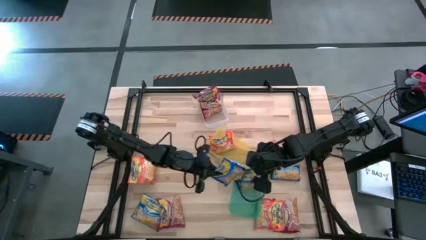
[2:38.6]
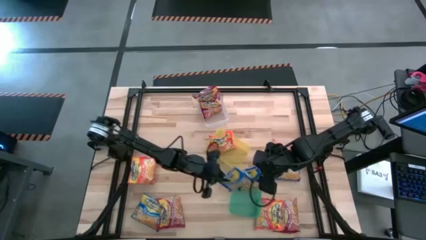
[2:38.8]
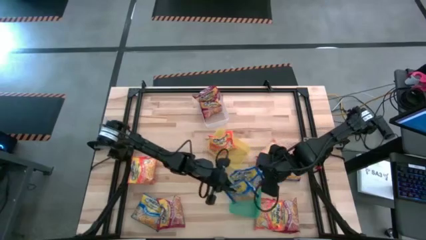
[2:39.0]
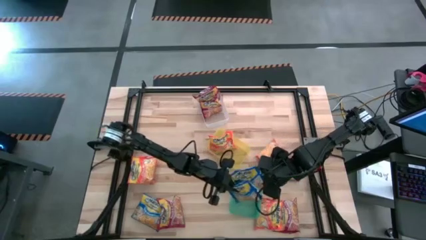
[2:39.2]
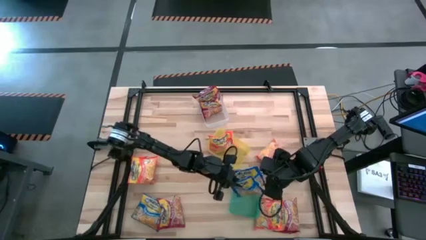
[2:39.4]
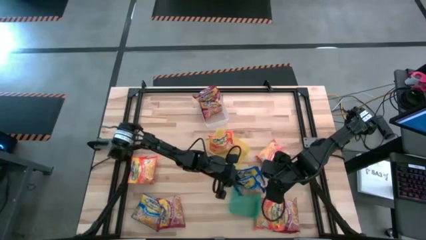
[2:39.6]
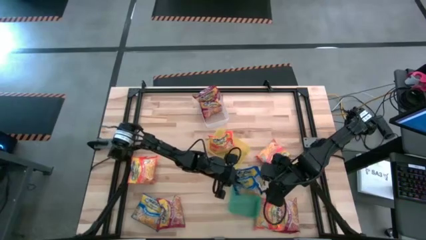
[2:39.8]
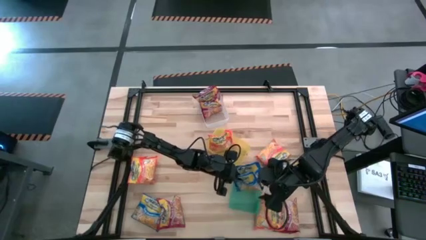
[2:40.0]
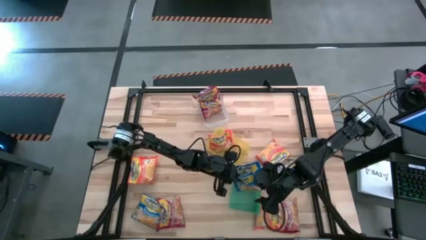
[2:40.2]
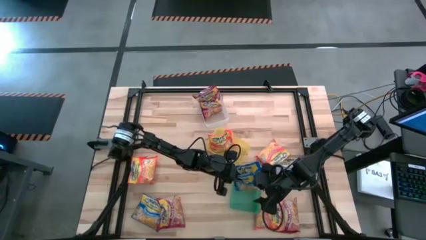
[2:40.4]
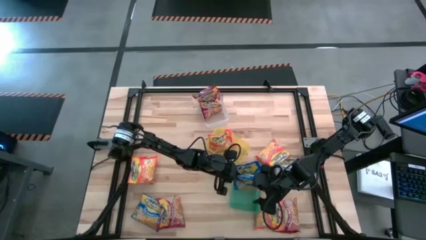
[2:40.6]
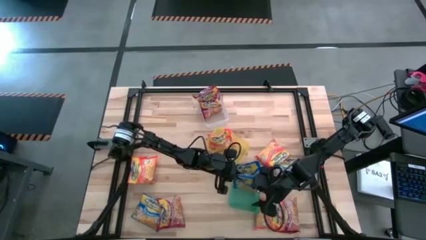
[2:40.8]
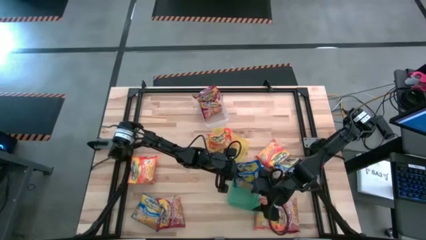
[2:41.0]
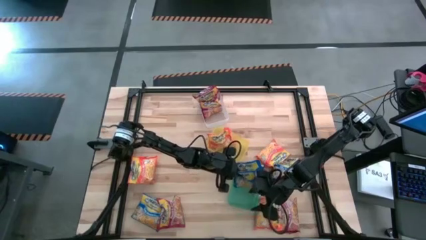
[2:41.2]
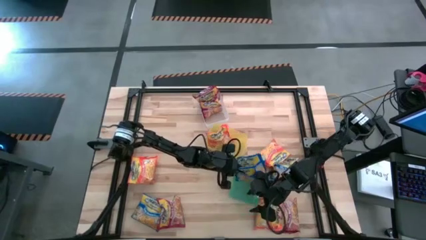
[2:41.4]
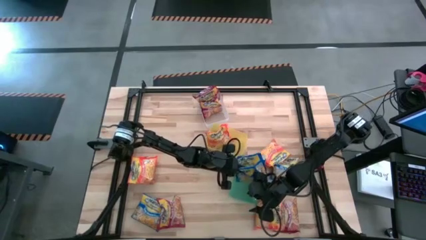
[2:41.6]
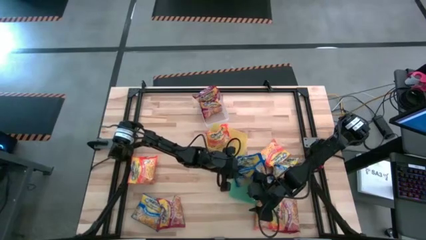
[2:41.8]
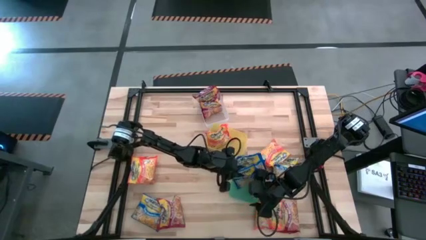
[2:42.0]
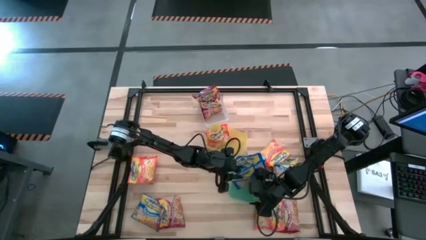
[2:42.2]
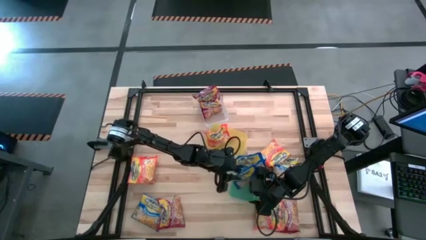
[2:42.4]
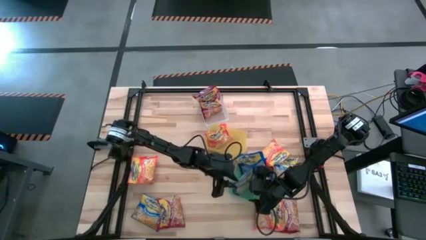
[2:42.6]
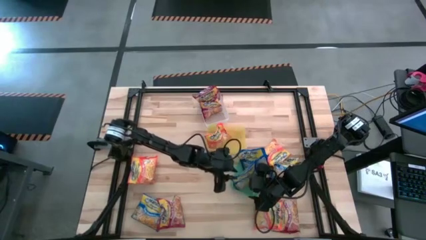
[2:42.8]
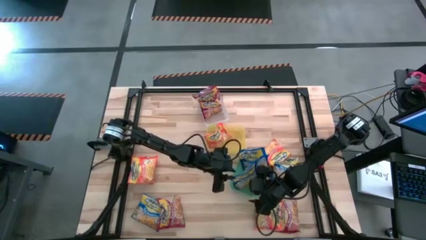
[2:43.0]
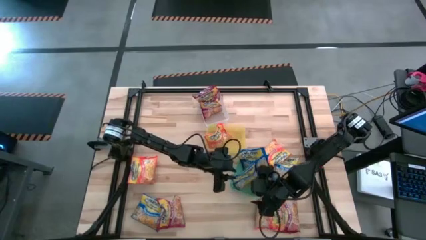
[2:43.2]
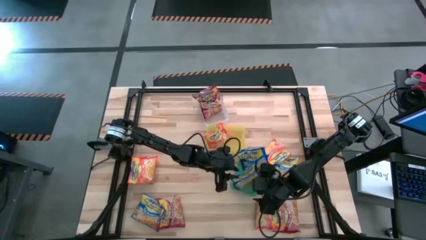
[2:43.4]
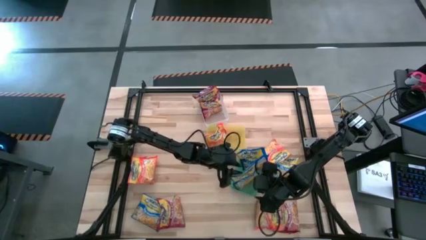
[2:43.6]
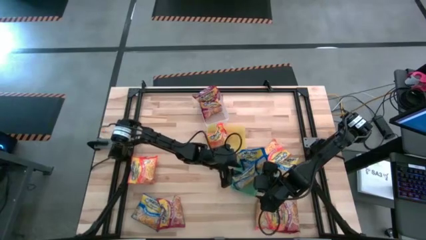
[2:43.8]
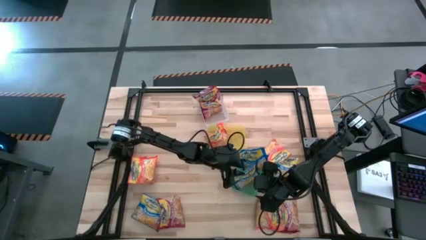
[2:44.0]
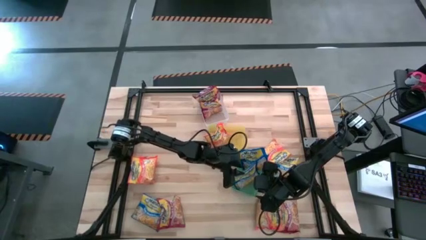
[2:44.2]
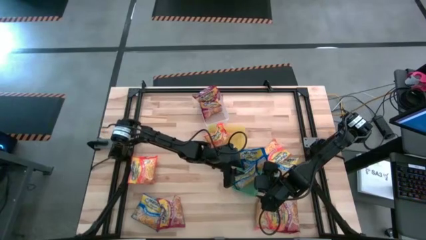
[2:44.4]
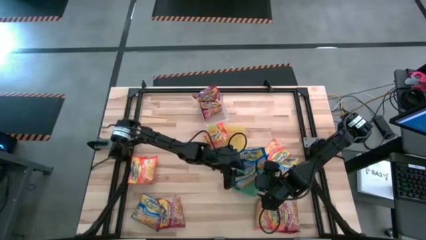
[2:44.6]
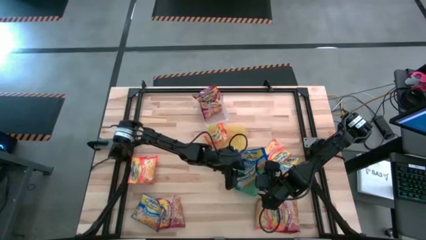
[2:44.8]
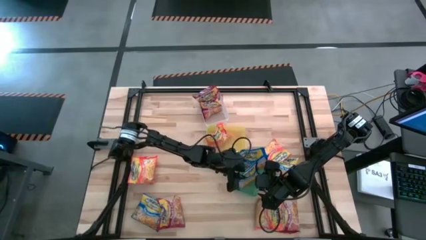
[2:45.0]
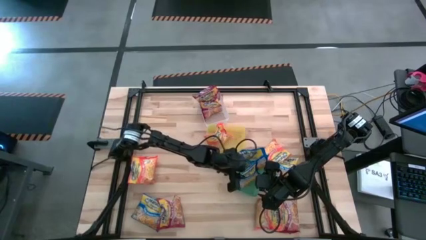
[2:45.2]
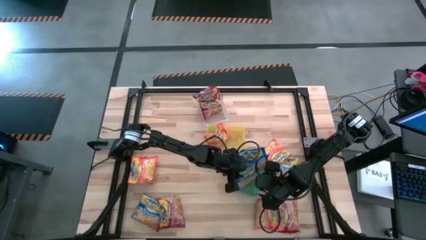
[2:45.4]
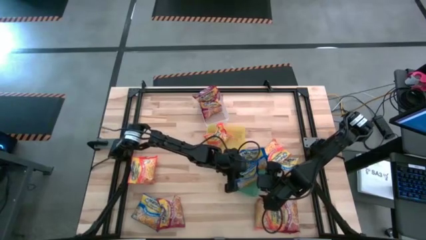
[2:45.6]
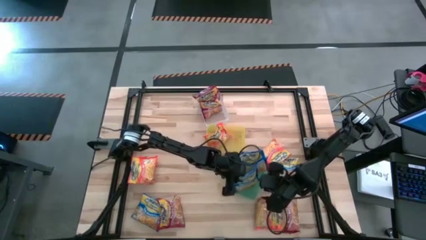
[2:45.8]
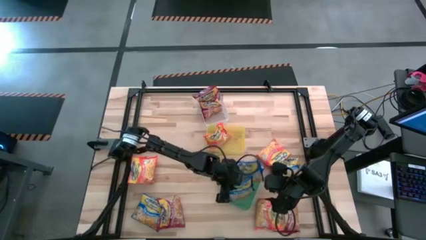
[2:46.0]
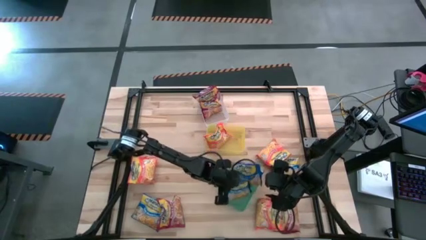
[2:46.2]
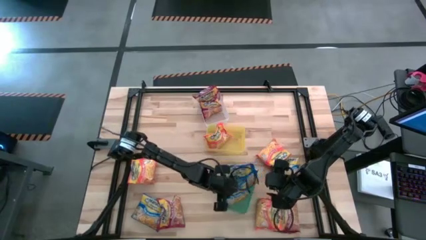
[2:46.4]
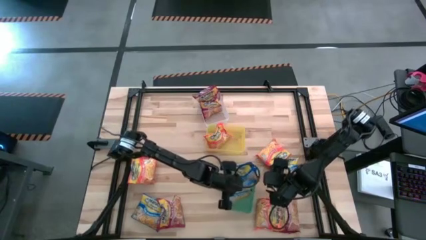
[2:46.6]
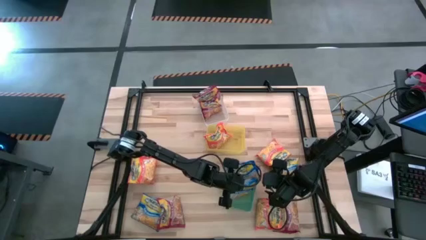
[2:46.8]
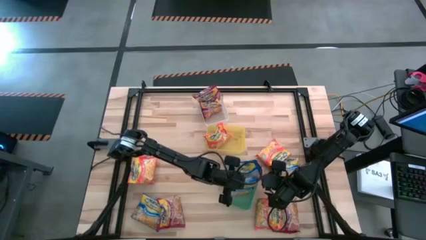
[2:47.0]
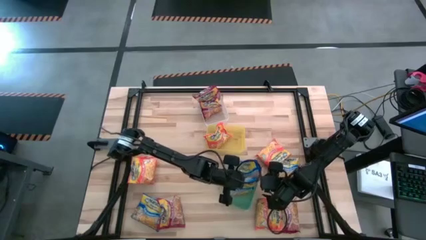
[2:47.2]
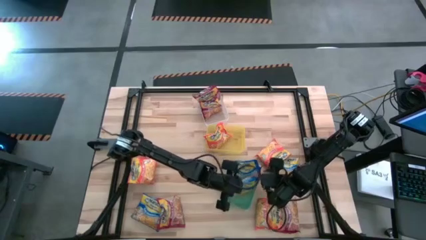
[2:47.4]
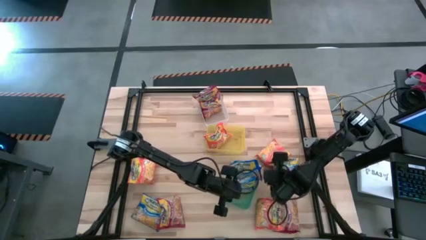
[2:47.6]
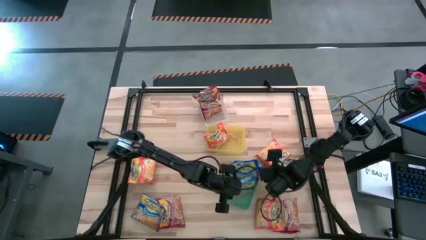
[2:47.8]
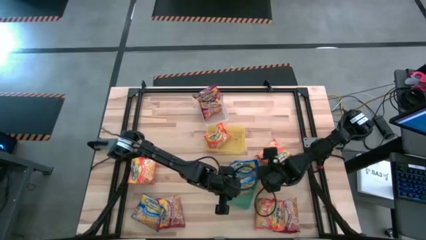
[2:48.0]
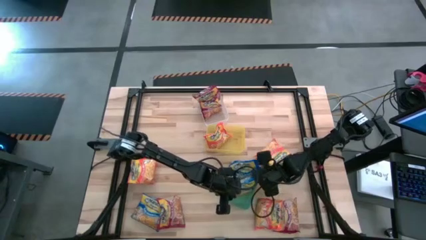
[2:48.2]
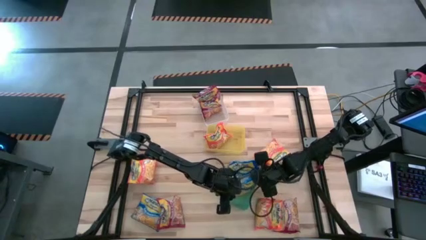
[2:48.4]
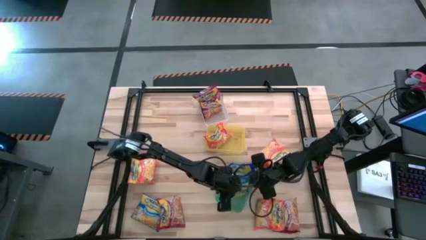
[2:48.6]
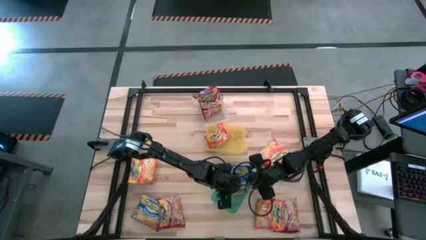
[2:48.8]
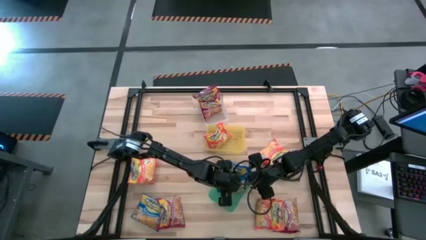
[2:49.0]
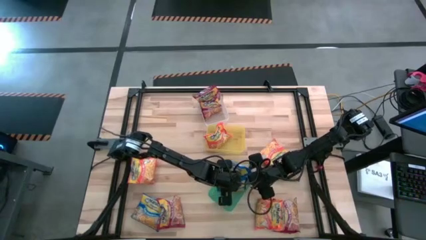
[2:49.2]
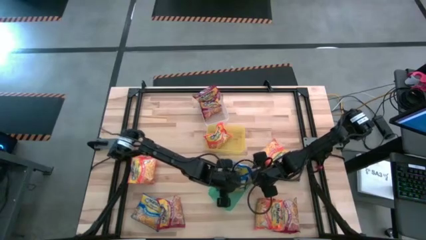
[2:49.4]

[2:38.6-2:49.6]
Task: Sort Maruchan noodles
Put the blue noodle pack into the green bin

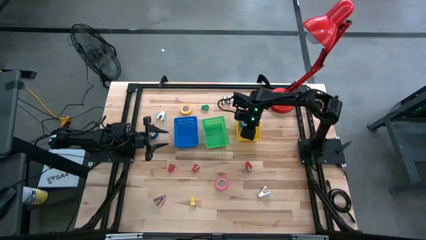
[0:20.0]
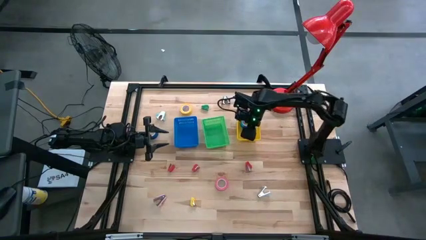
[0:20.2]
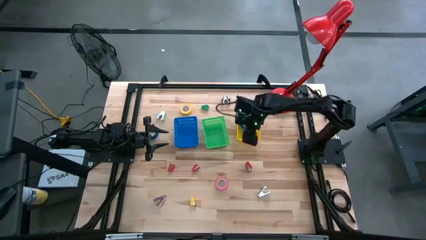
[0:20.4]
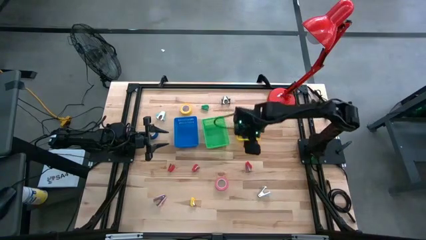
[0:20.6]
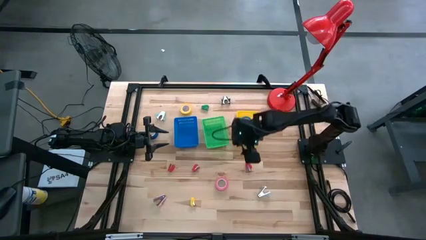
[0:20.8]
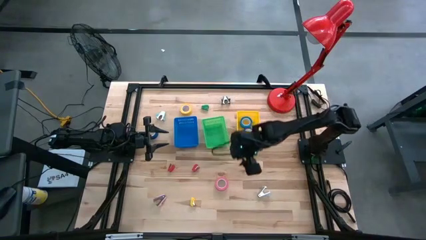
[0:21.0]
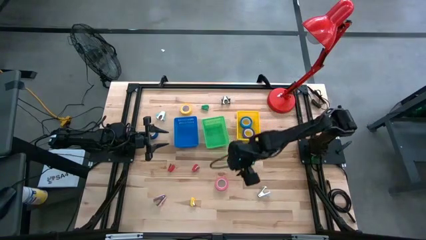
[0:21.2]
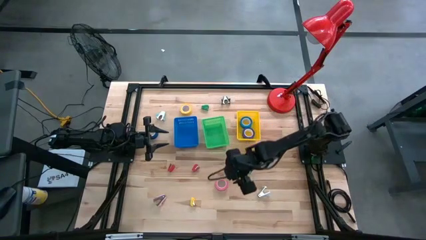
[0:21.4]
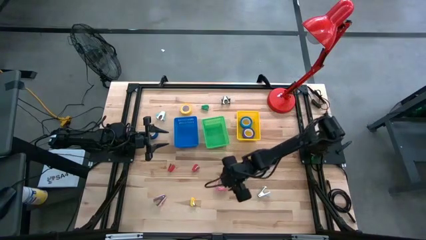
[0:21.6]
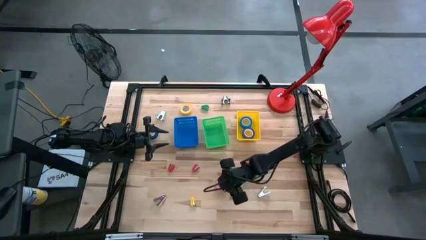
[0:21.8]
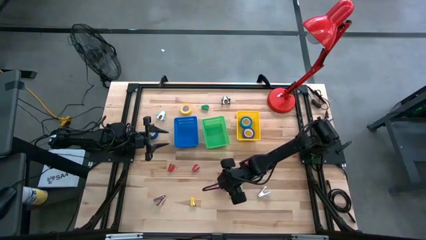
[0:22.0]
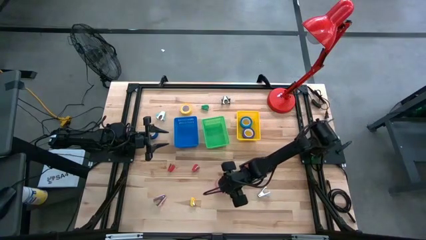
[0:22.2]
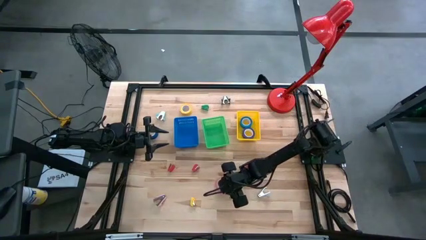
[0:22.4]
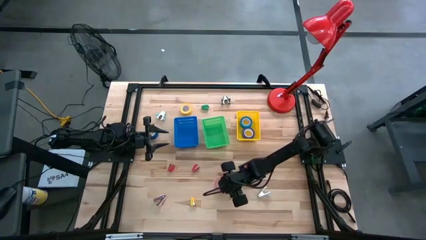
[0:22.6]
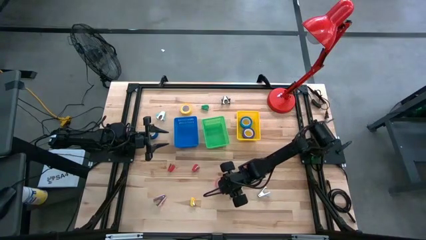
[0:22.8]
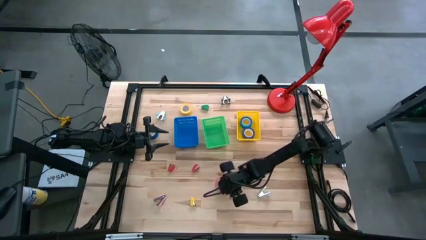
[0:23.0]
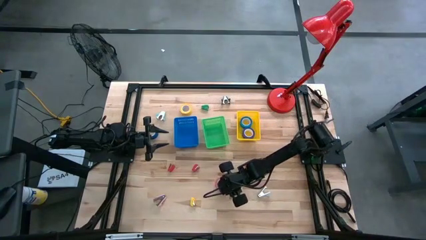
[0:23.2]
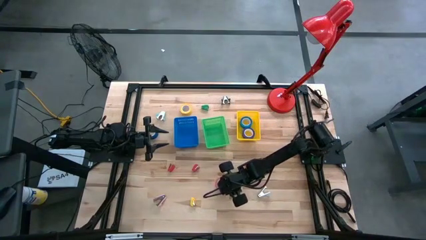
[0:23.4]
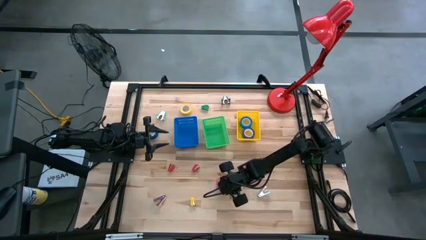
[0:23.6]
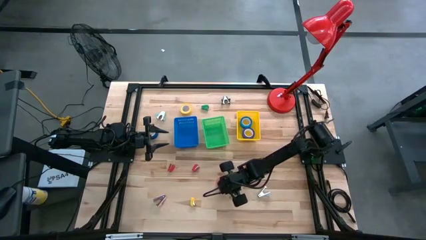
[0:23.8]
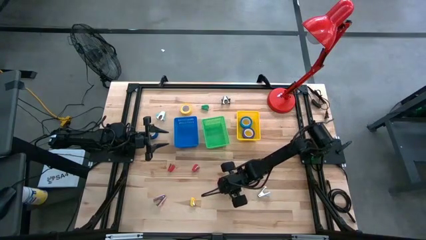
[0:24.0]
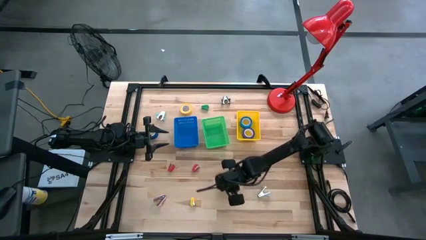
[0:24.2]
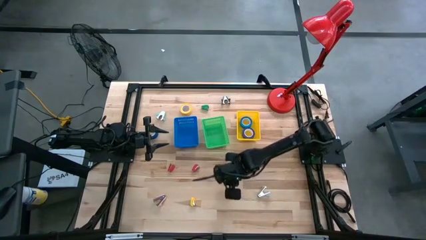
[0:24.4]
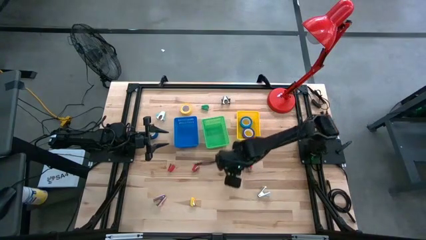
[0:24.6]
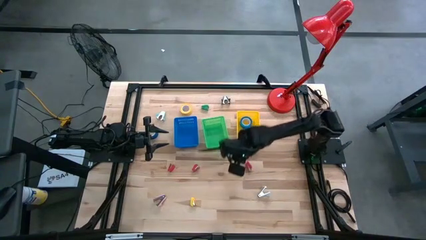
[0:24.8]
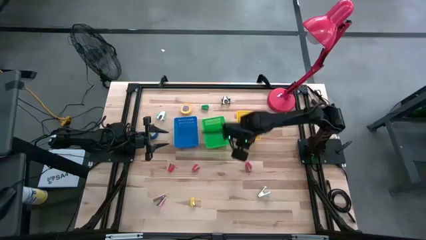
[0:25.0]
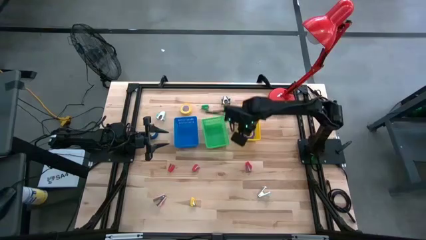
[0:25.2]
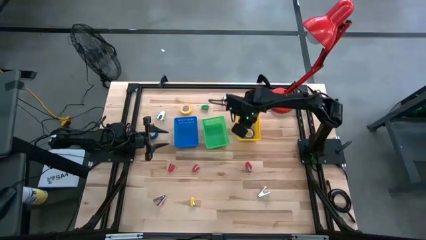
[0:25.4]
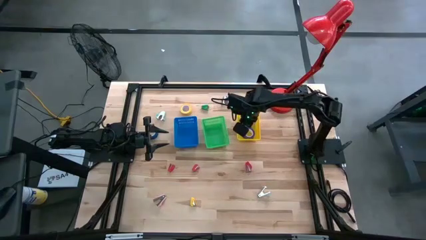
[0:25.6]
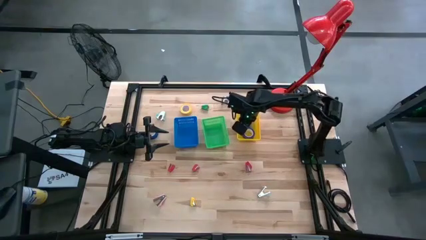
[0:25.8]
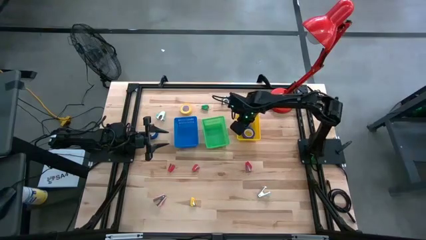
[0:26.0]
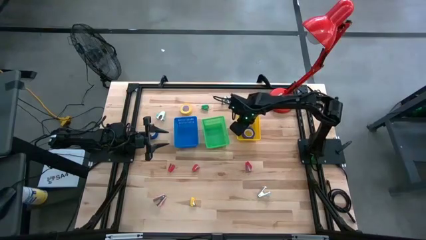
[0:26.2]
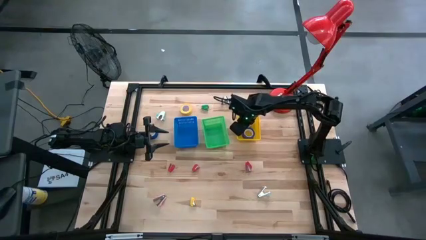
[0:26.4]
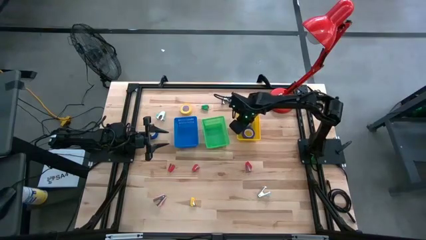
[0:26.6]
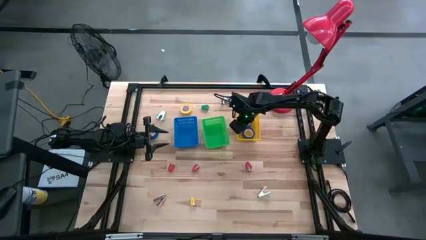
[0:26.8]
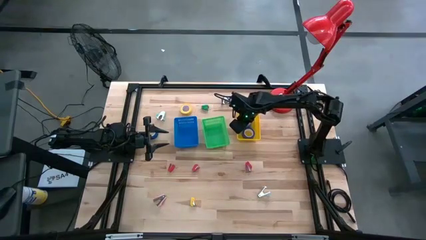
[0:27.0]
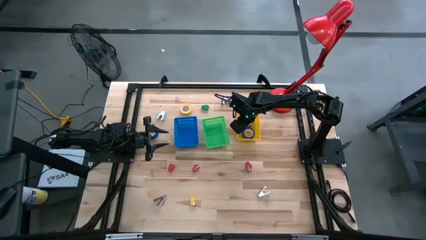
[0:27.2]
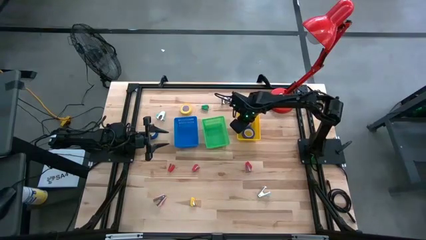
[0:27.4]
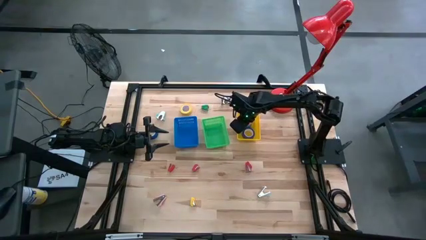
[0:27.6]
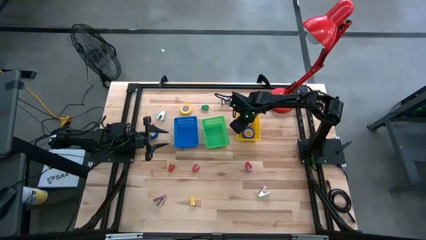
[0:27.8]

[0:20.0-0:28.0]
Task: Pick and place Stapler, Stapler remover, tape
Put the pink tape into the yellow bin
